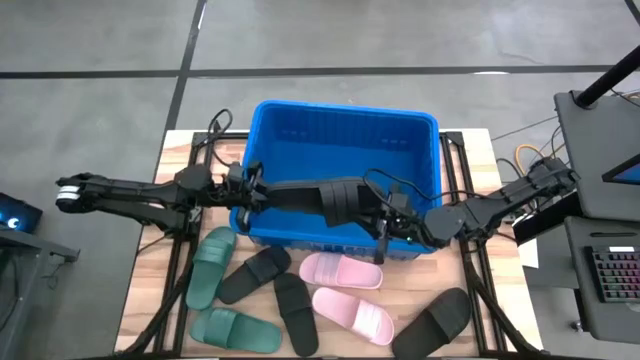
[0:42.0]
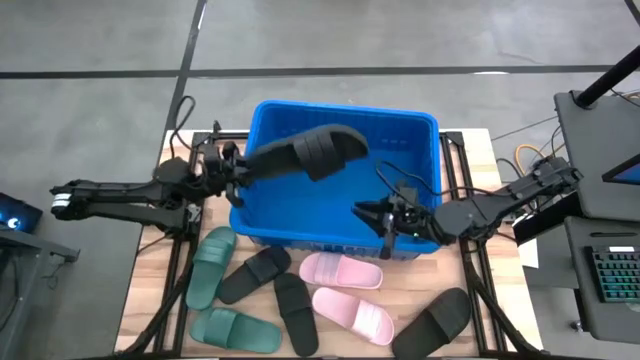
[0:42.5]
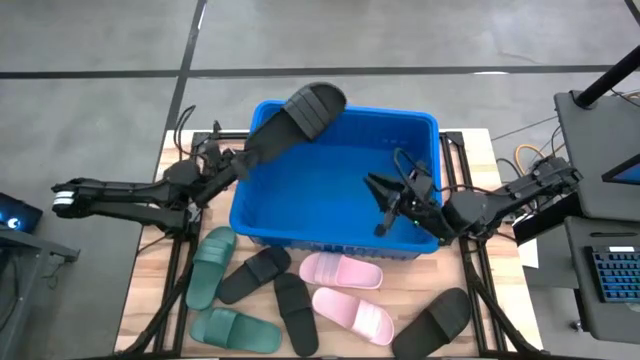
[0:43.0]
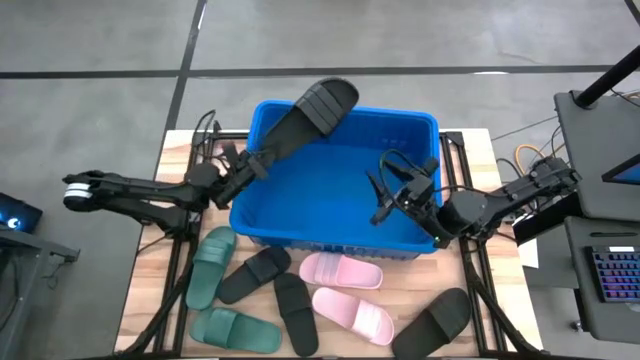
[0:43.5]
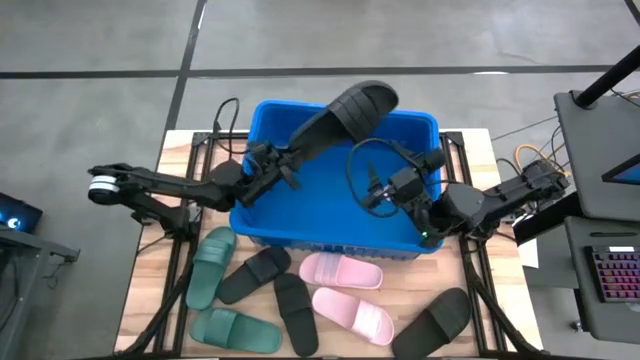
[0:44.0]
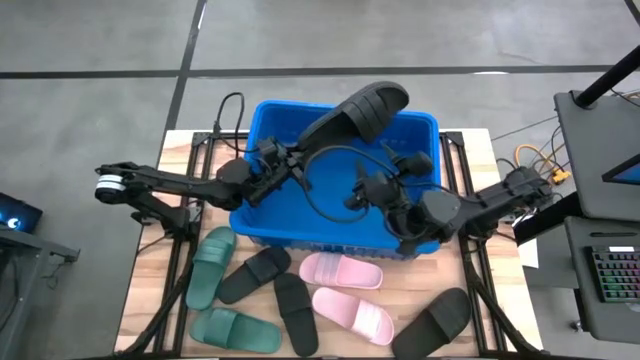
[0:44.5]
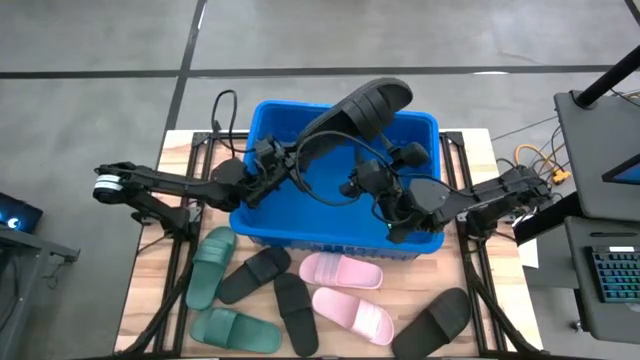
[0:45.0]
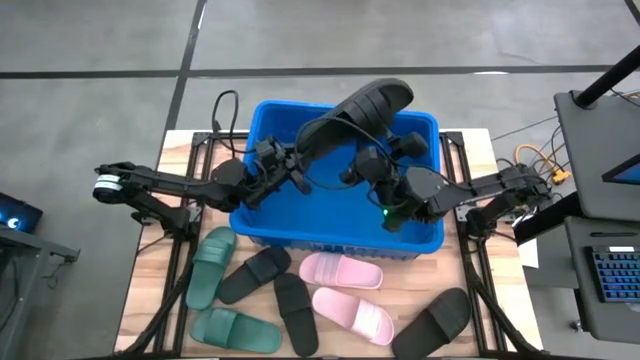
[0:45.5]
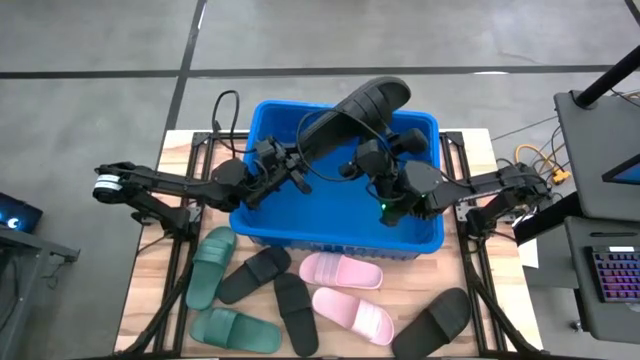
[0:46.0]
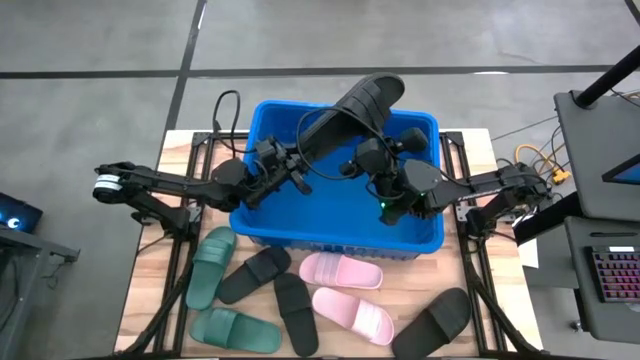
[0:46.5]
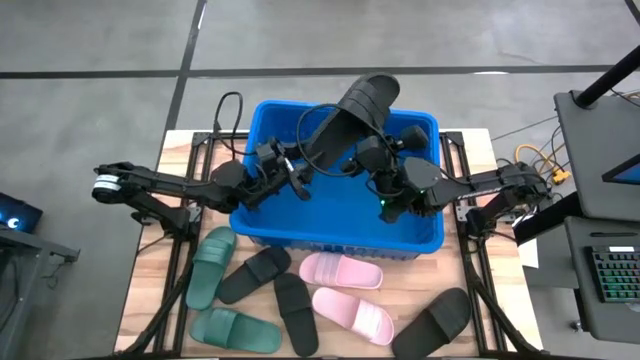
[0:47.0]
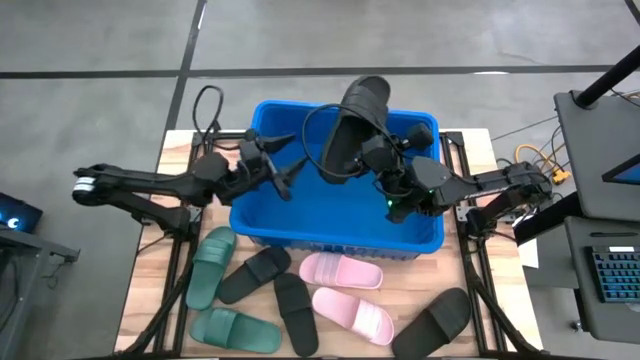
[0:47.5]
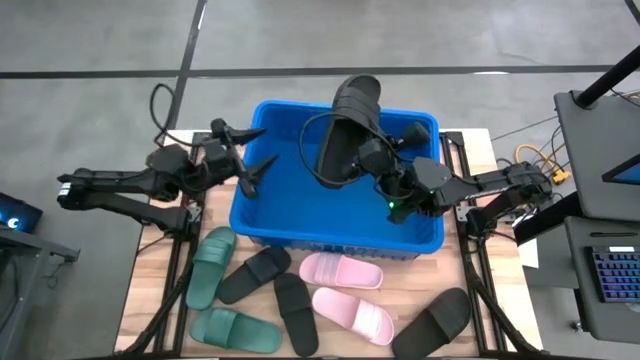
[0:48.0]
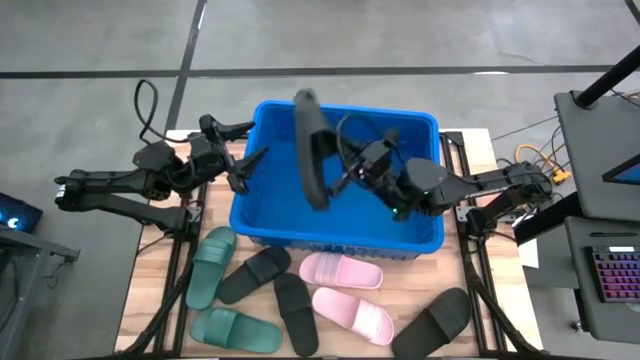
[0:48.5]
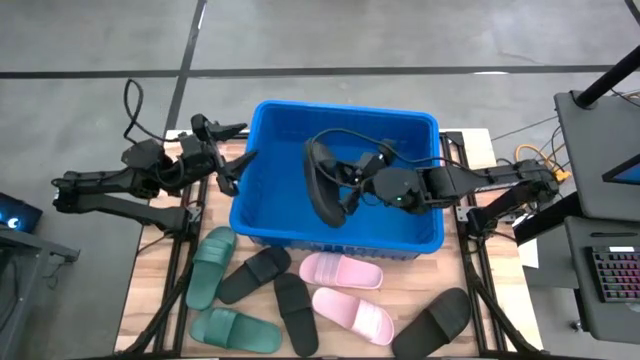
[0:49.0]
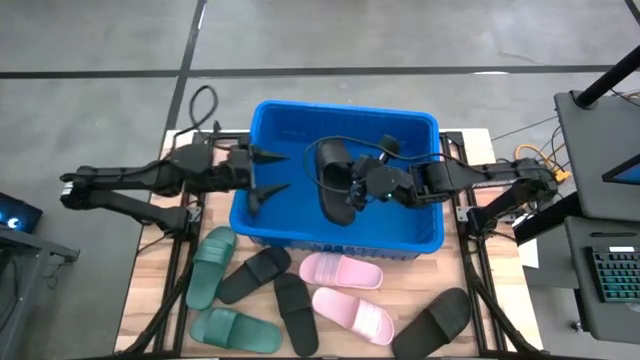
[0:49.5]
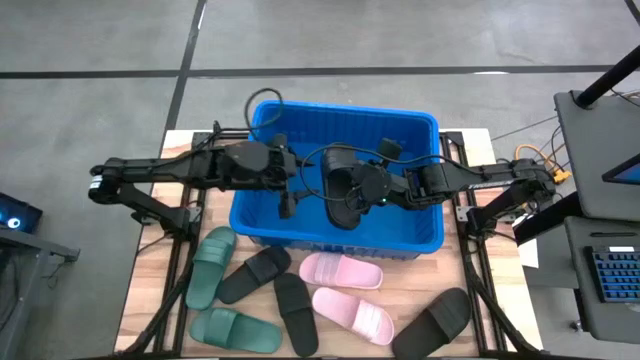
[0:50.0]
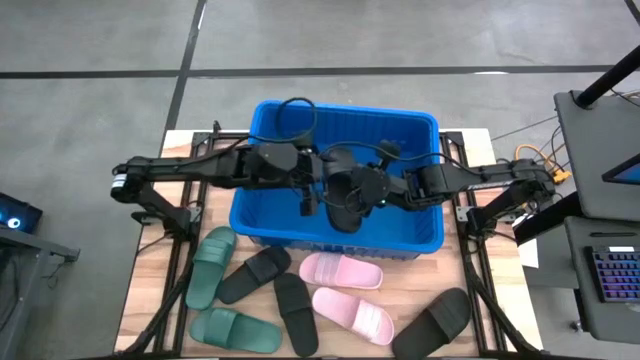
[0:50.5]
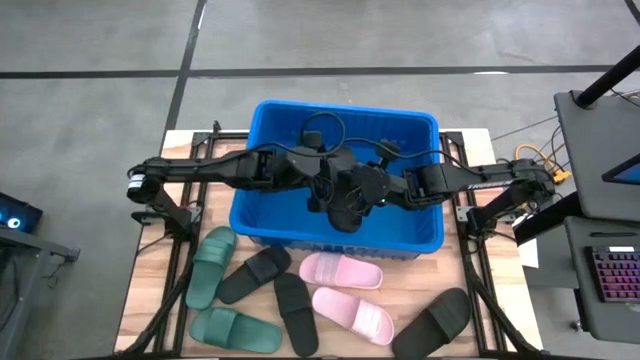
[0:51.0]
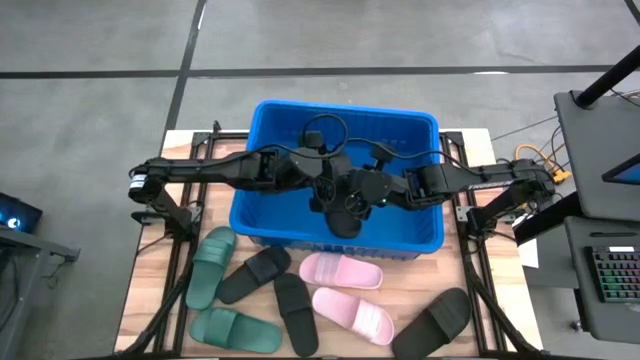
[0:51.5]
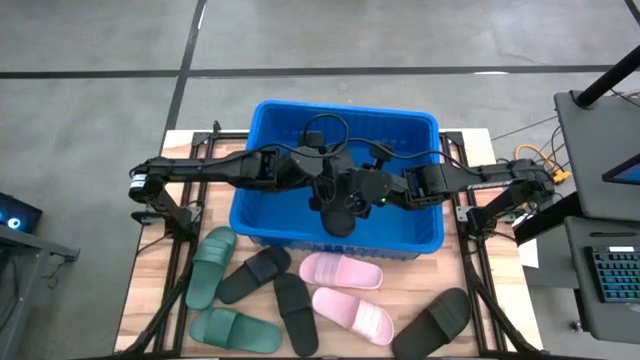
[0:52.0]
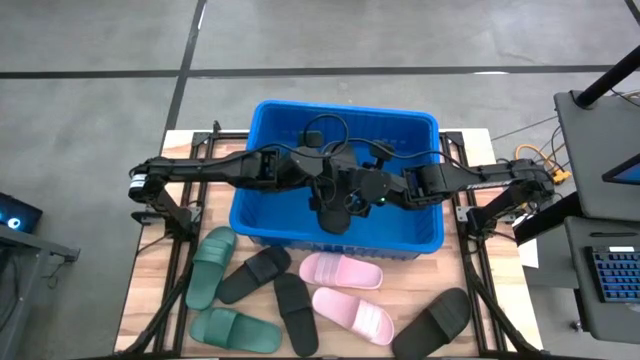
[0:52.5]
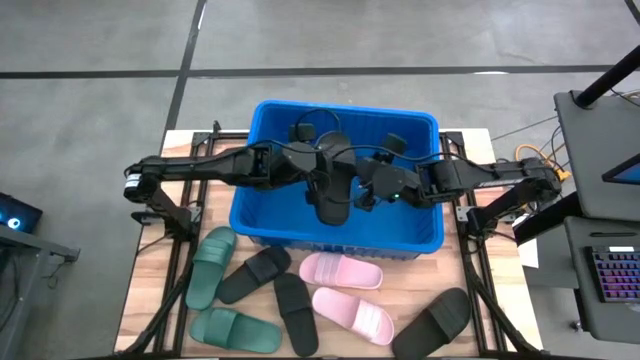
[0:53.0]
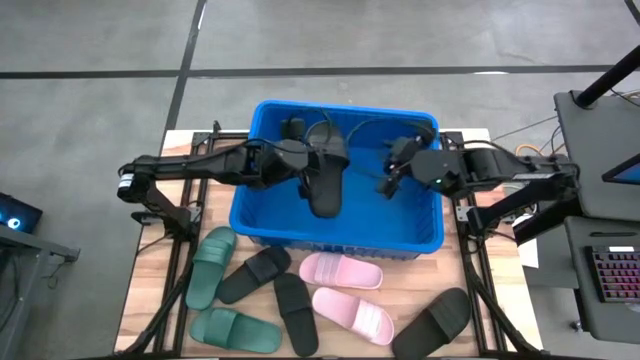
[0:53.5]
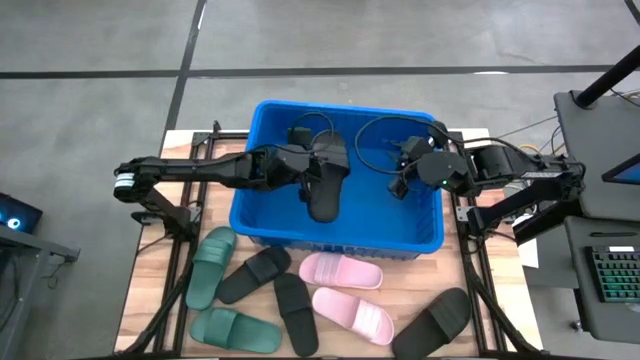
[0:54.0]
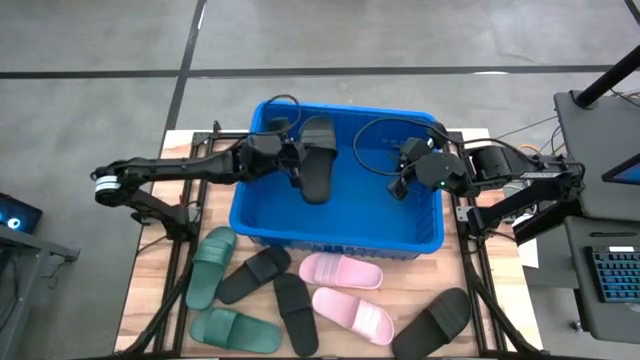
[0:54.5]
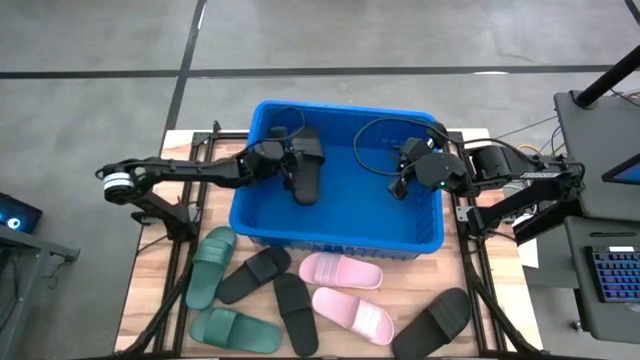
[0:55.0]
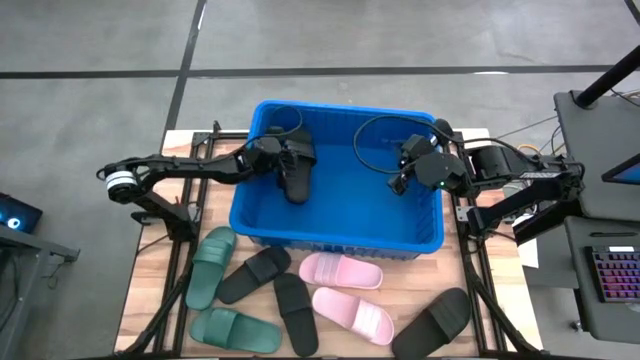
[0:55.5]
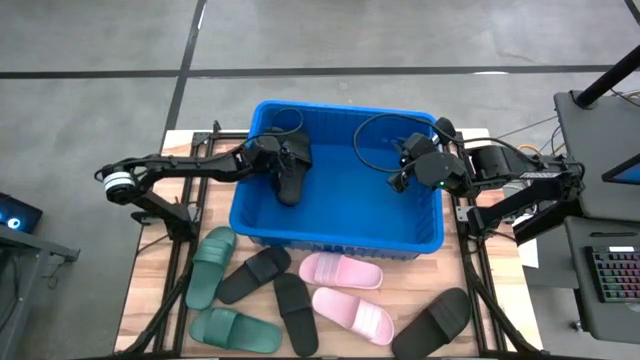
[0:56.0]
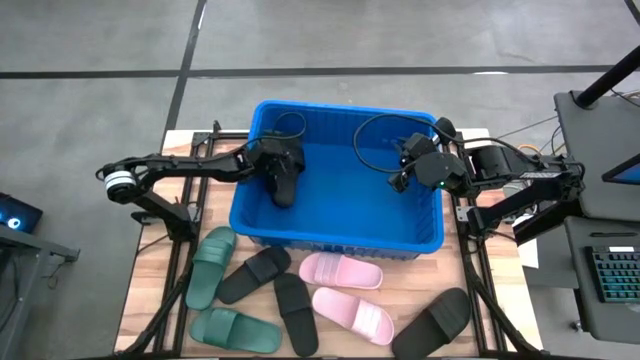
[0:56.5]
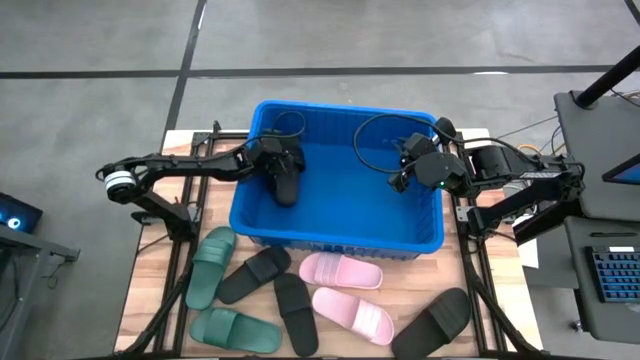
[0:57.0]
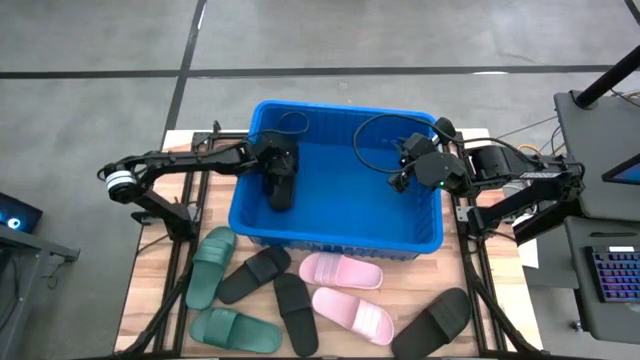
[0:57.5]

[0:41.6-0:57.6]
Task: Pick and place slides into bin
Put the top right black slide into the blue bin

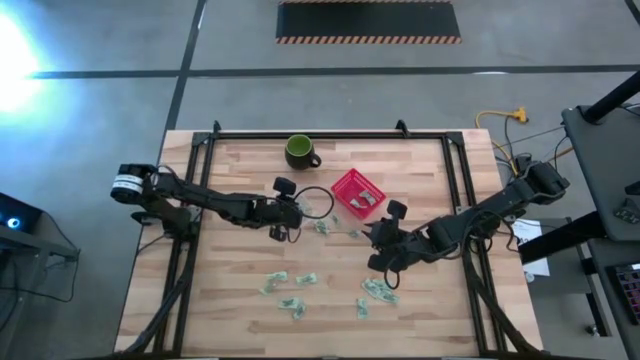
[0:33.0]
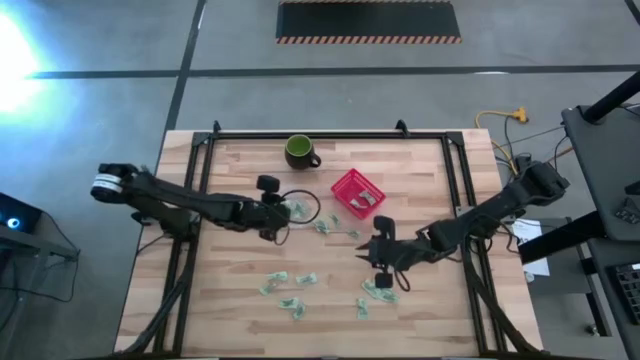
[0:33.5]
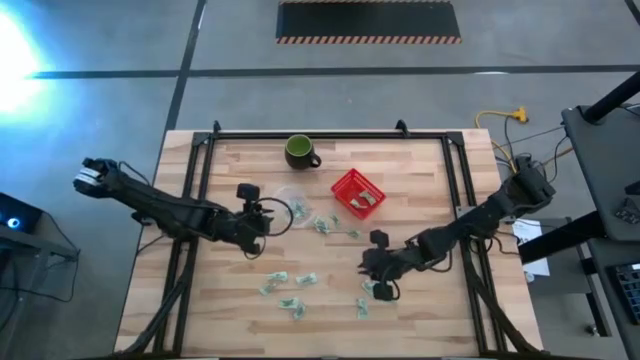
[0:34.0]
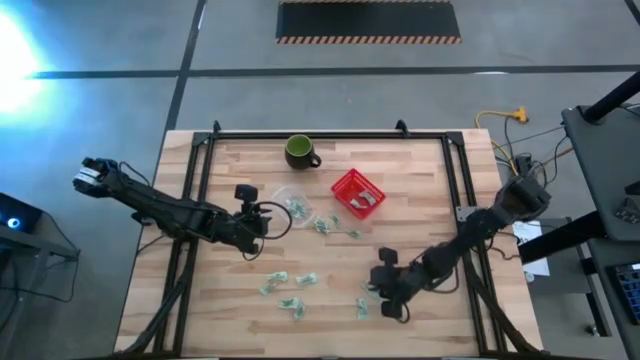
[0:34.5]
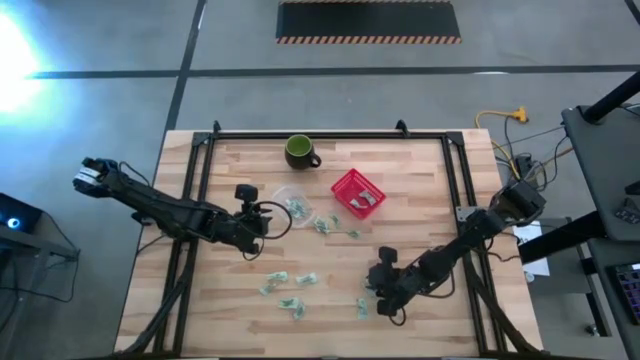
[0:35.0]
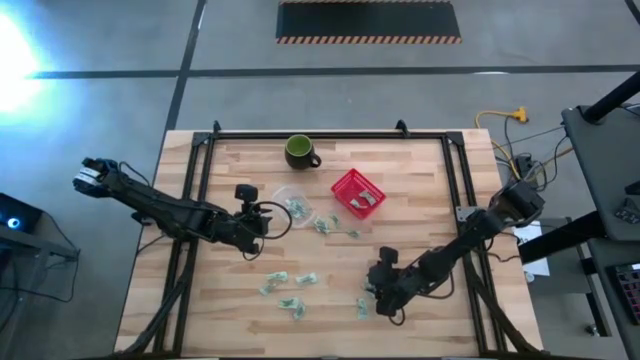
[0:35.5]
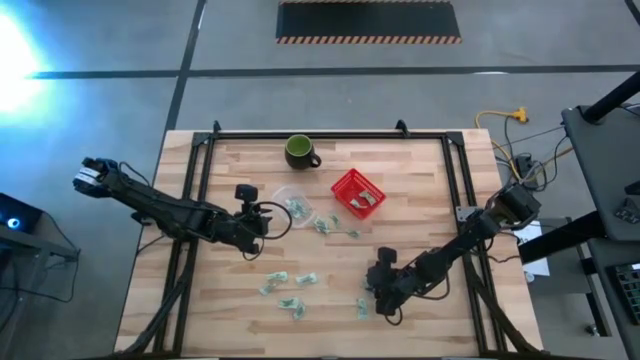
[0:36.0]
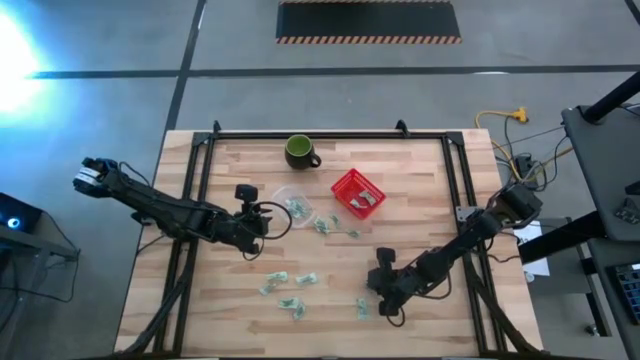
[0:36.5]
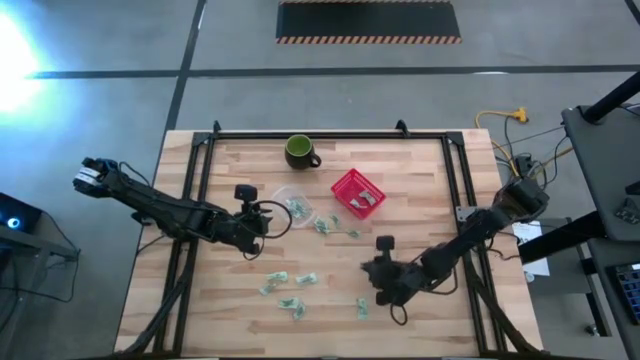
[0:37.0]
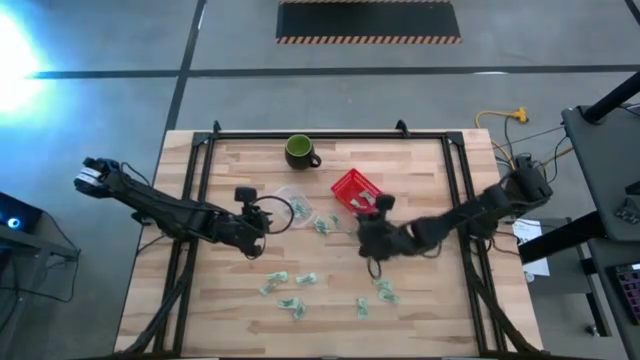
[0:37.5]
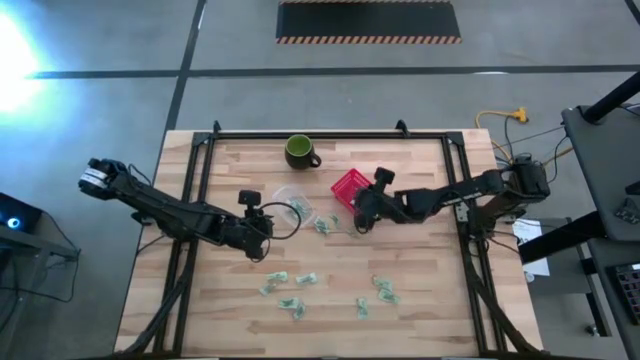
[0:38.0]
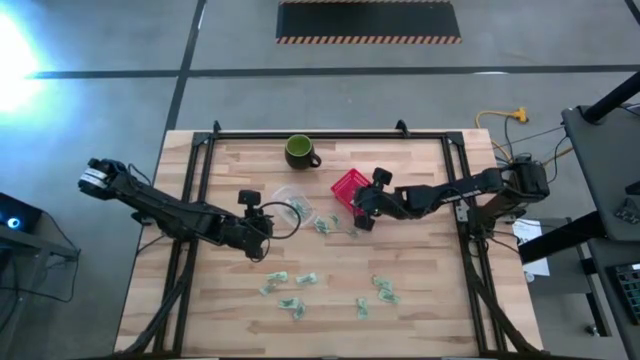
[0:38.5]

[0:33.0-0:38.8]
Task: Pick and place items into bin
Put the stevia packet into the red bin
